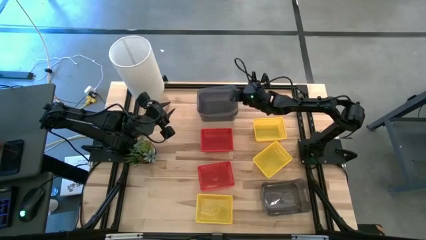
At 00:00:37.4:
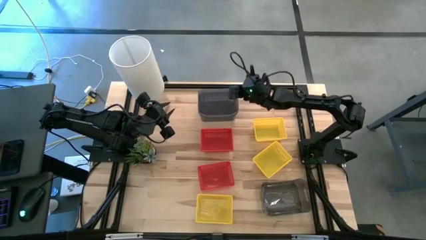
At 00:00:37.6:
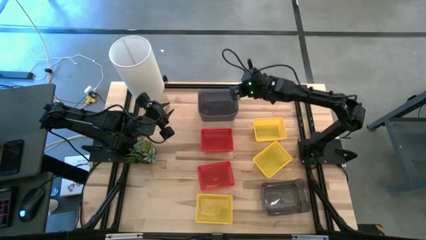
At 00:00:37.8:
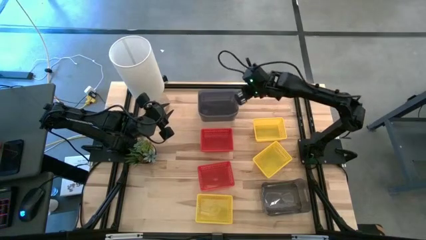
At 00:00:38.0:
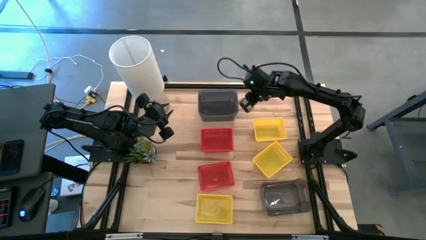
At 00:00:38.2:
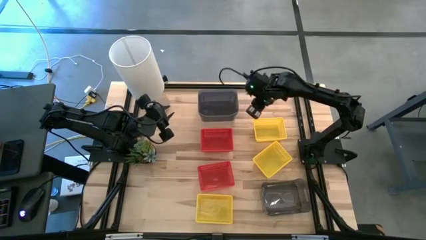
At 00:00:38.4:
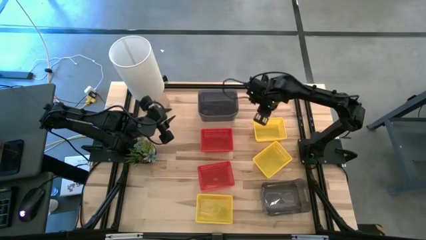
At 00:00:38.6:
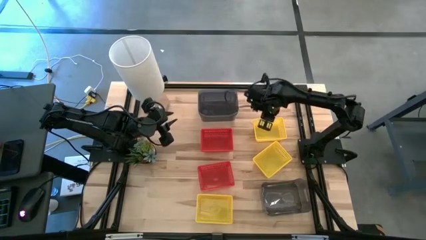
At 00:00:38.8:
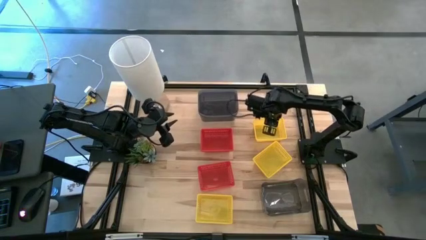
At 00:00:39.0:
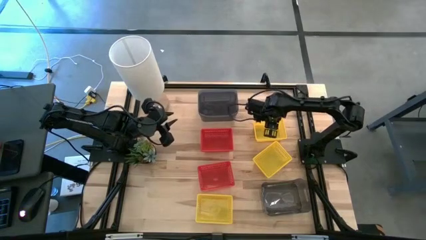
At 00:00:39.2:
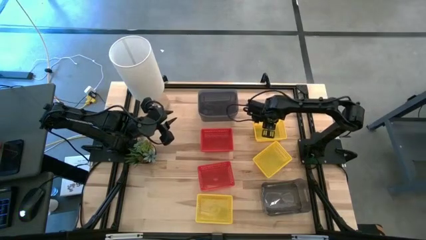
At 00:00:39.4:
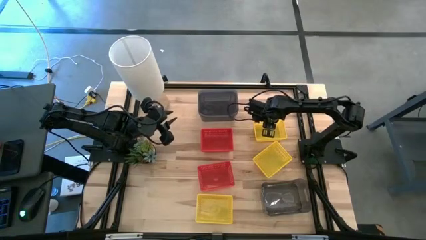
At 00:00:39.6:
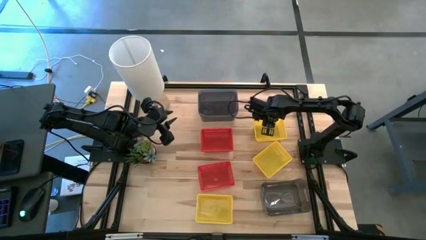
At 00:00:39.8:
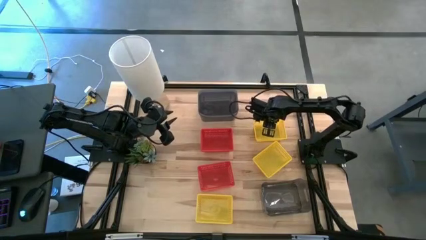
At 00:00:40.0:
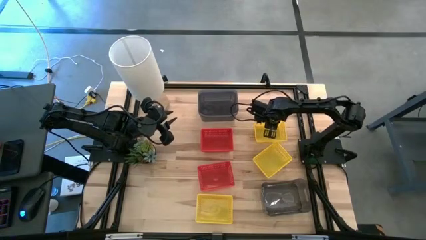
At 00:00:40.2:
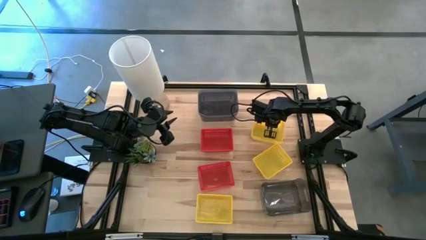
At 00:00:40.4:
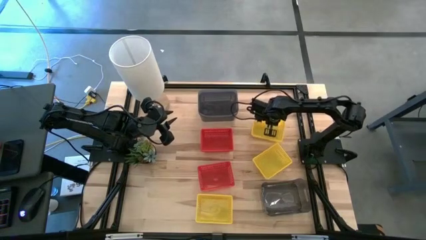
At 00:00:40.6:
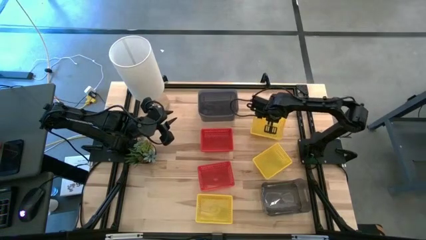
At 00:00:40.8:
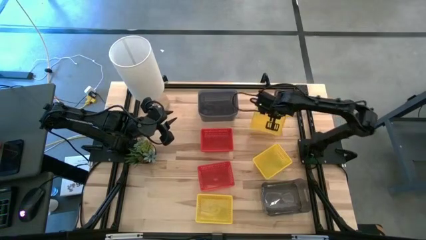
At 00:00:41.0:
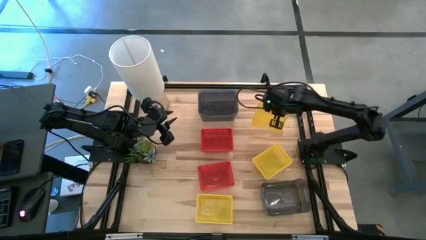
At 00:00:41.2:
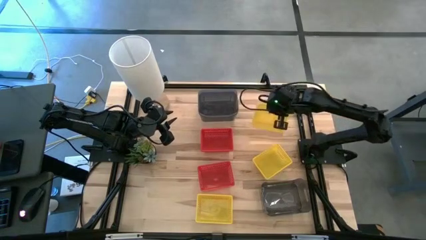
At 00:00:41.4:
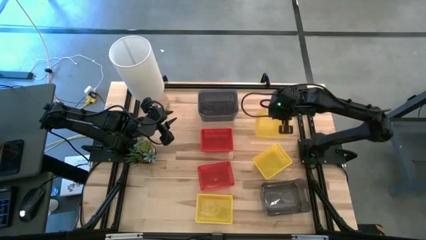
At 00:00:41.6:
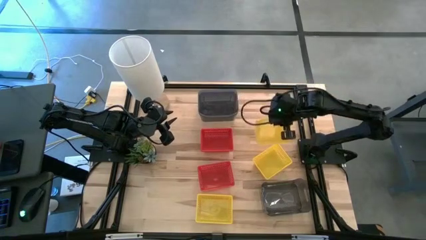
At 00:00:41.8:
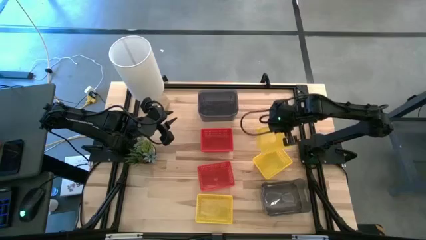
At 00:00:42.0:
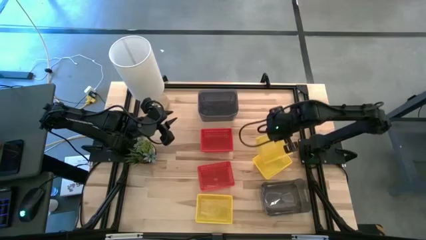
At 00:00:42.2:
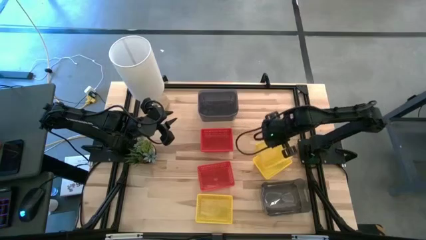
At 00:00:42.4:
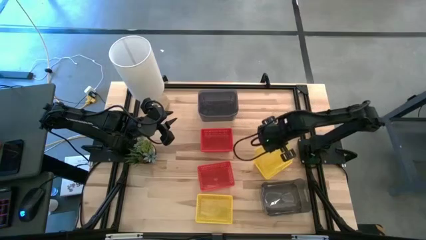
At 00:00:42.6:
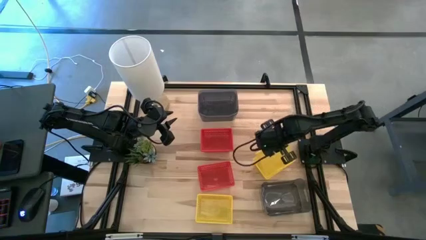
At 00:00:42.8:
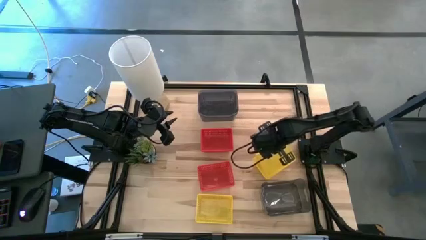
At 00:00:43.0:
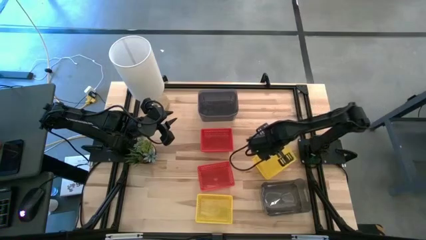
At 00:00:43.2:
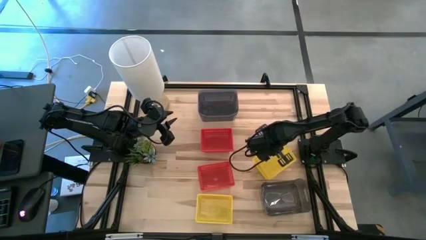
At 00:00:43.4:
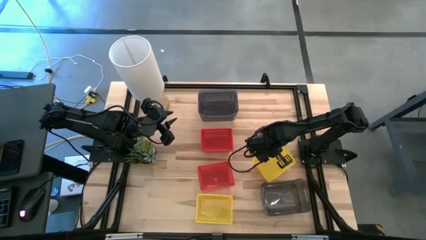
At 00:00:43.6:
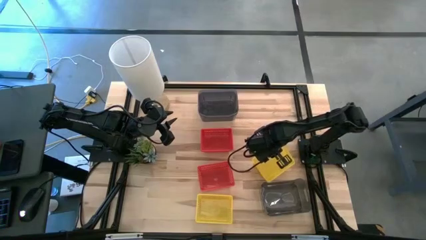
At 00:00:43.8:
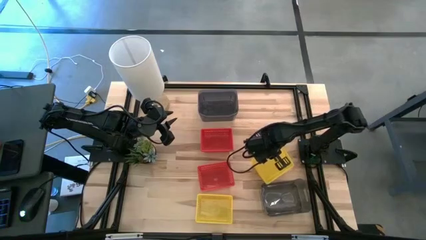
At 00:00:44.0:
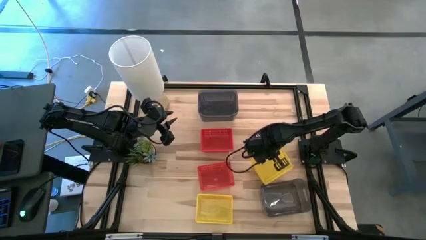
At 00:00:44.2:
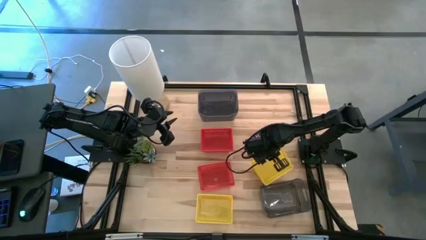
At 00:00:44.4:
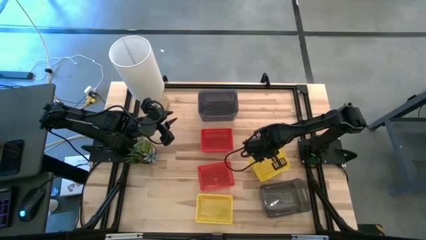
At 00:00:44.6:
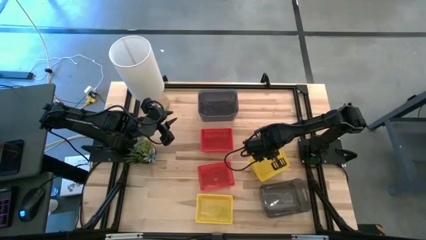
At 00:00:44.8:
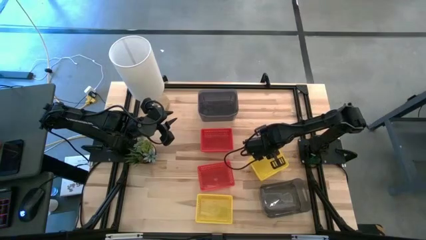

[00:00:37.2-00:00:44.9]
Stack the top yellow basket on the middle right yellow basket

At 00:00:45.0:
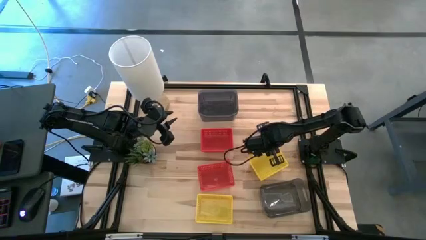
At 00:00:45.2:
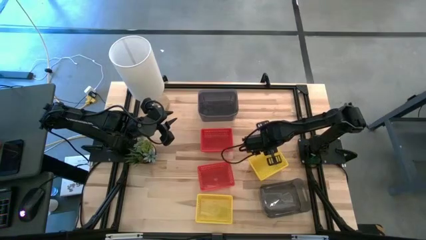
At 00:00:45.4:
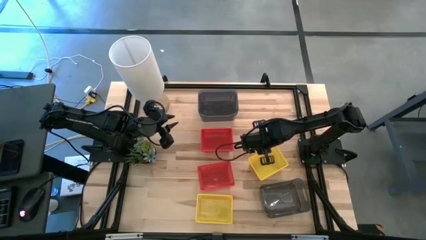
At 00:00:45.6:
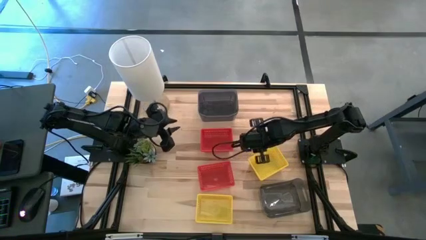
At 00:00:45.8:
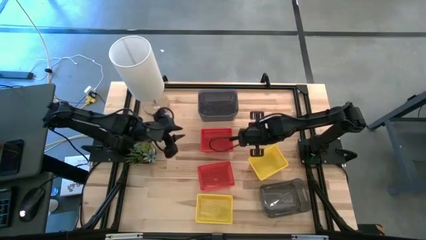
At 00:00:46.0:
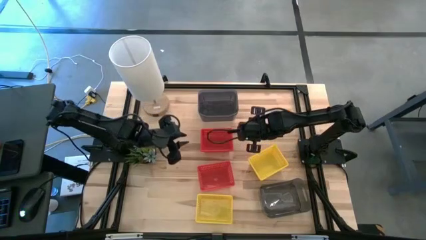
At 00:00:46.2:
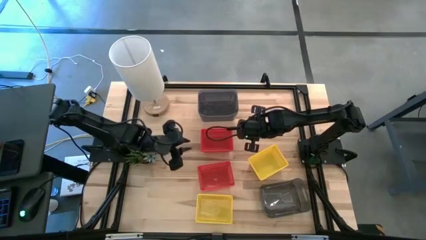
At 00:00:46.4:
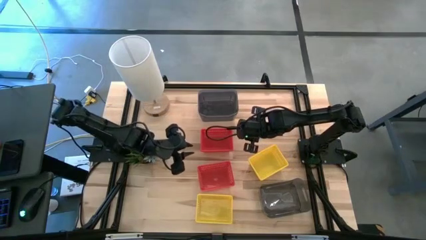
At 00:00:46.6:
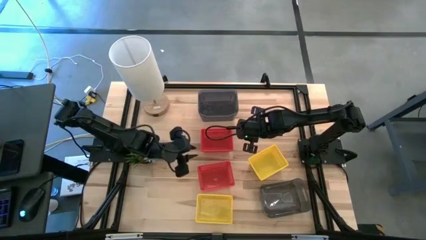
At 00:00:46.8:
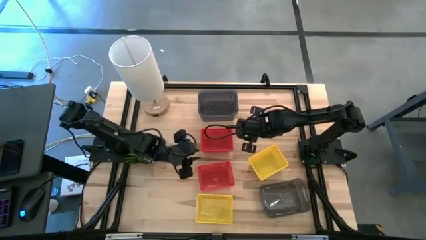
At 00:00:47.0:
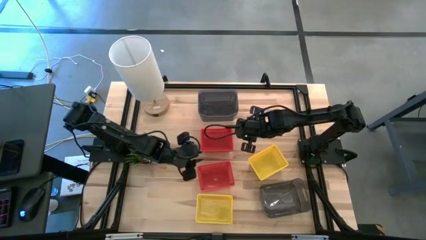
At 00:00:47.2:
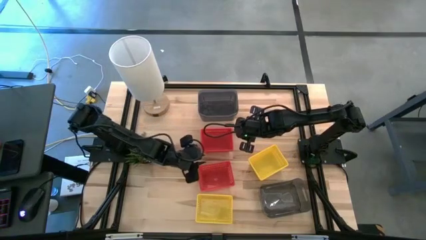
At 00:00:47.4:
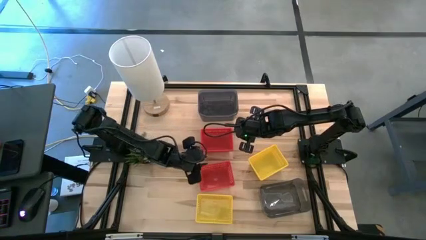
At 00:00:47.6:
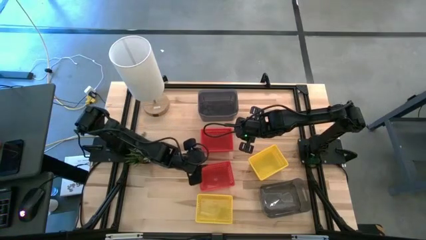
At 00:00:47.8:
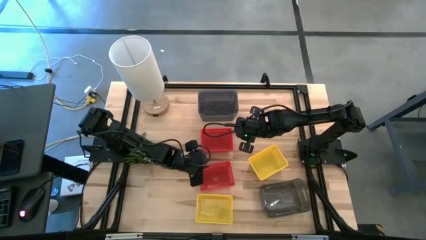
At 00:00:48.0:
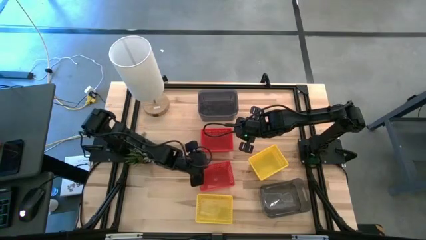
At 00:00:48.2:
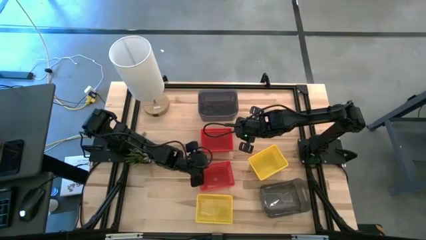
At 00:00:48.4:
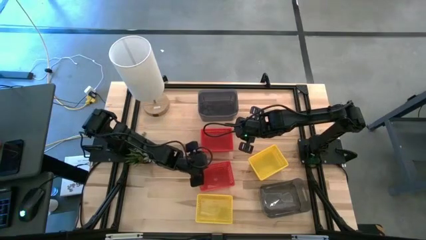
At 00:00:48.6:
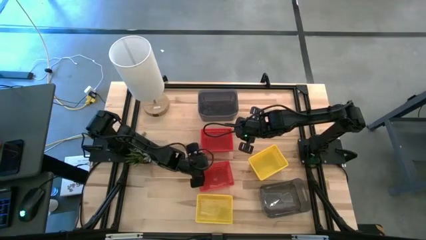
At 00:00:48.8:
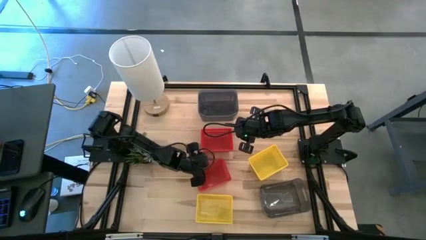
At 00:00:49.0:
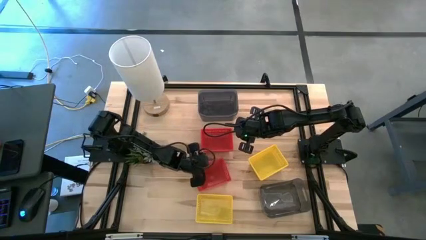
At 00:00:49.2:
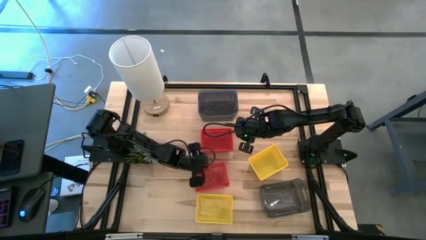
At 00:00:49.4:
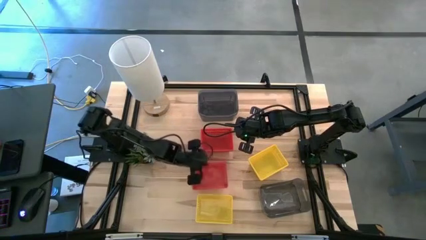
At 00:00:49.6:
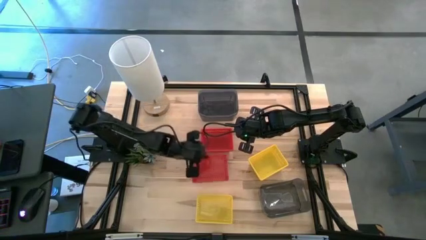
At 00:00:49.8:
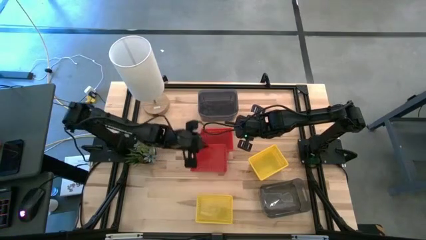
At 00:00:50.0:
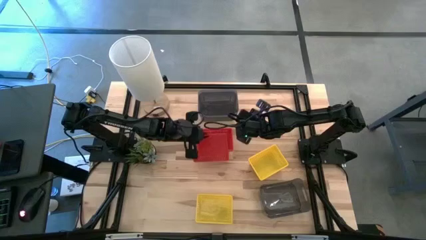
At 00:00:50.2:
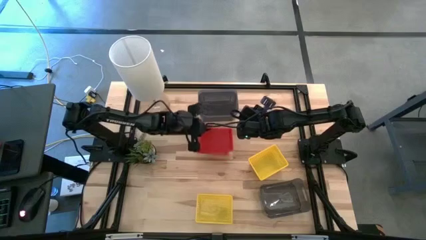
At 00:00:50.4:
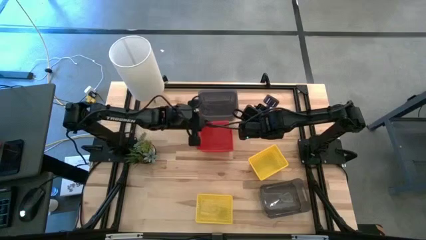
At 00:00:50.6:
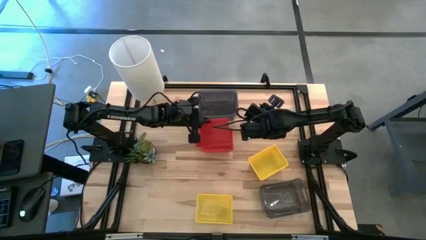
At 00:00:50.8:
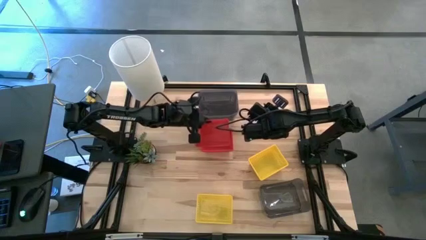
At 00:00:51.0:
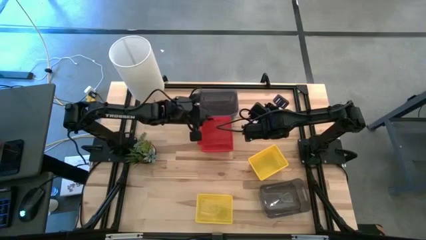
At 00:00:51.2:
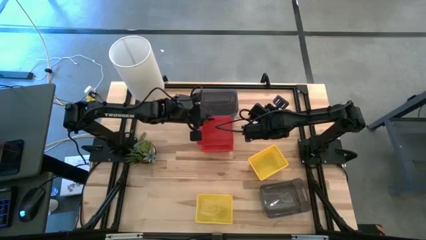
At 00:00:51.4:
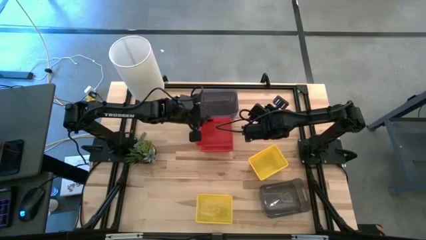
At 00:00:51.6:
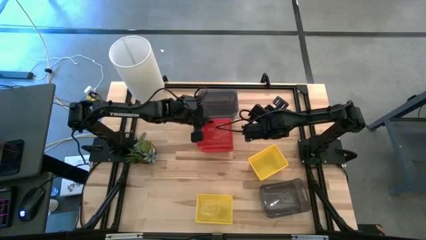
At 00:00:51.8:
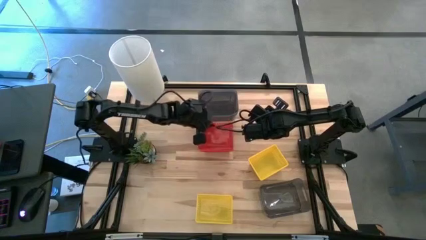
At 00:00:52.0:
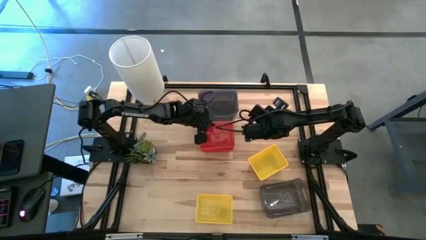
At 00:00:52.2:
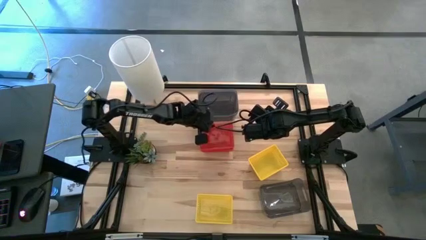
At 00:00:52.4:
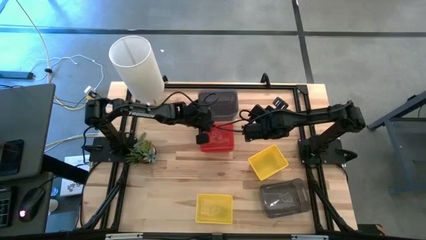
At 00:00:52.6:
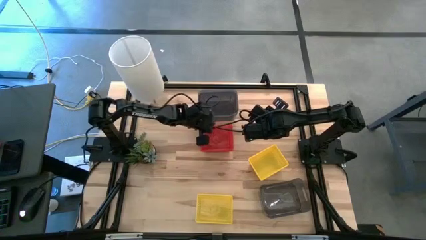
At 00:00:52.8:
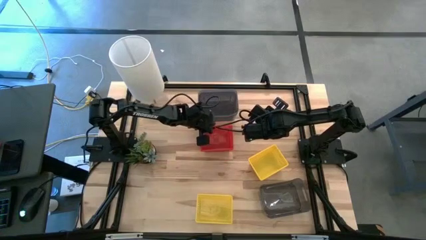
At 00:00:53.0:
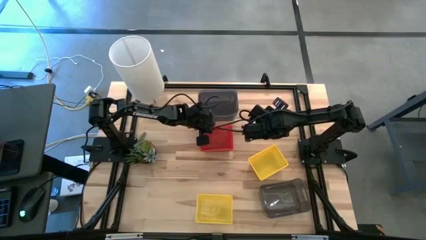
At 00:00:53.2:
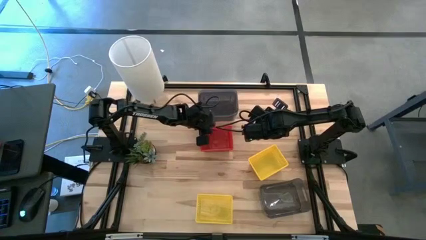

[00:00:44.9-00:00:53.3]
Stack the bottom red basket on the red baskets
